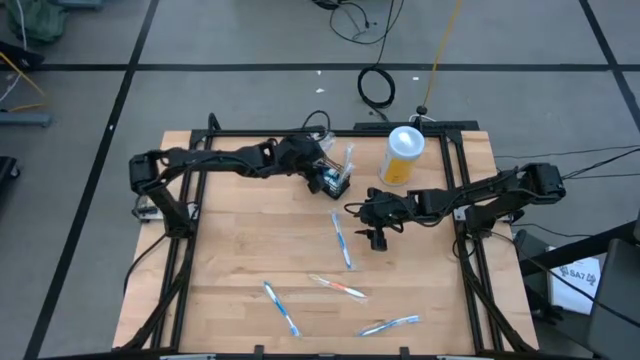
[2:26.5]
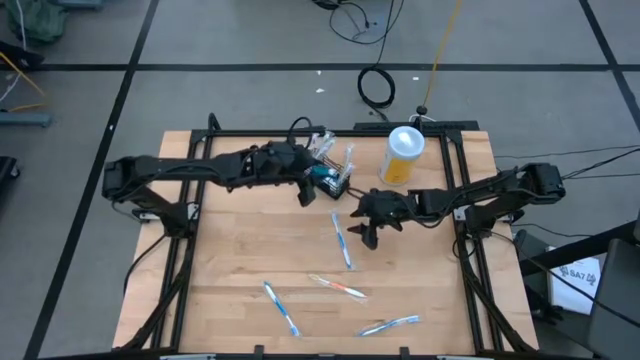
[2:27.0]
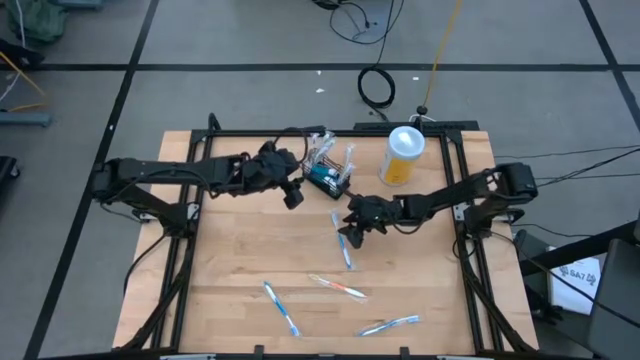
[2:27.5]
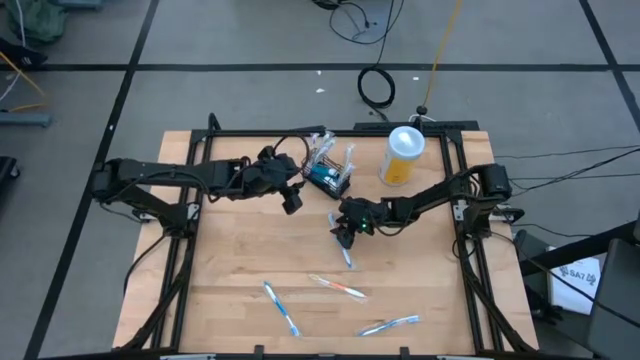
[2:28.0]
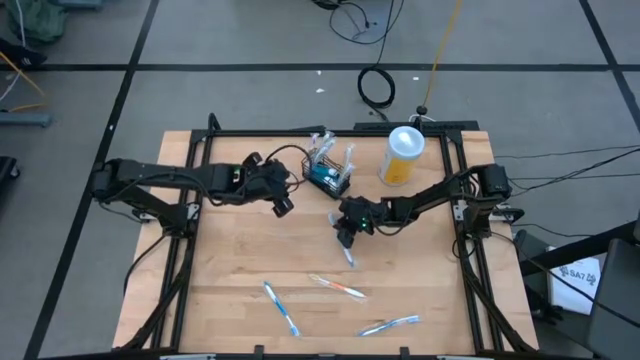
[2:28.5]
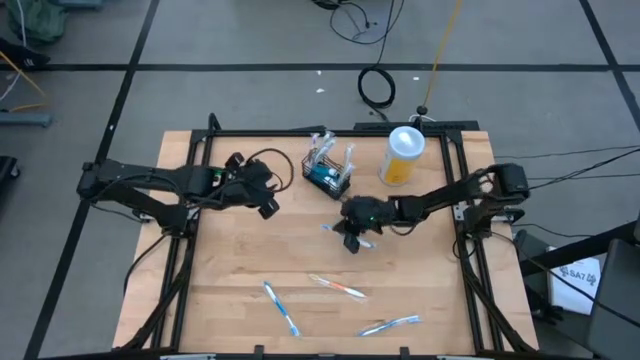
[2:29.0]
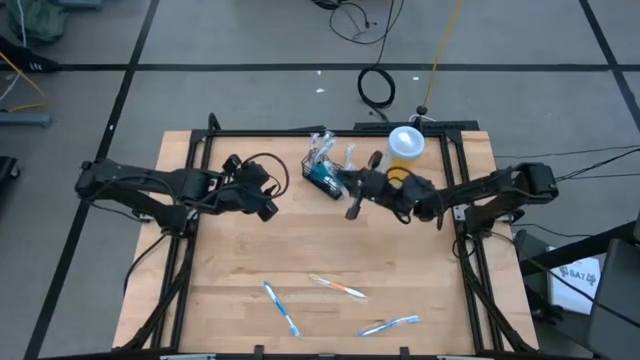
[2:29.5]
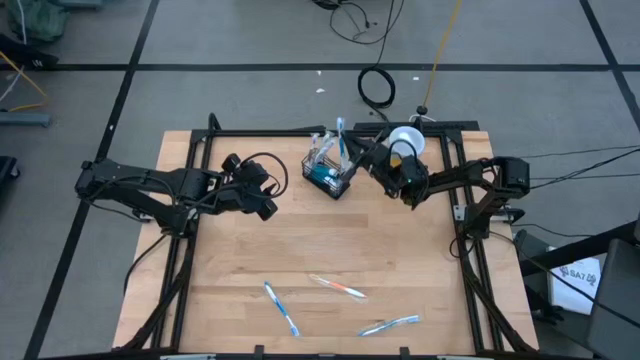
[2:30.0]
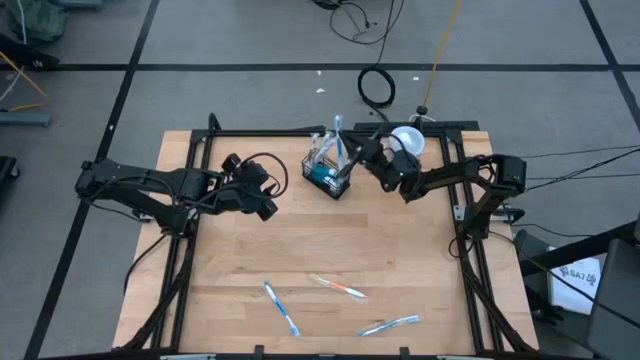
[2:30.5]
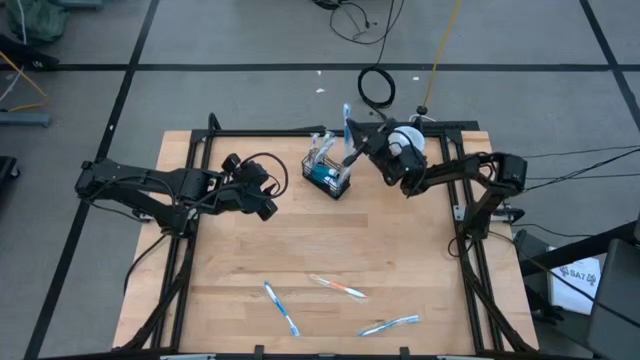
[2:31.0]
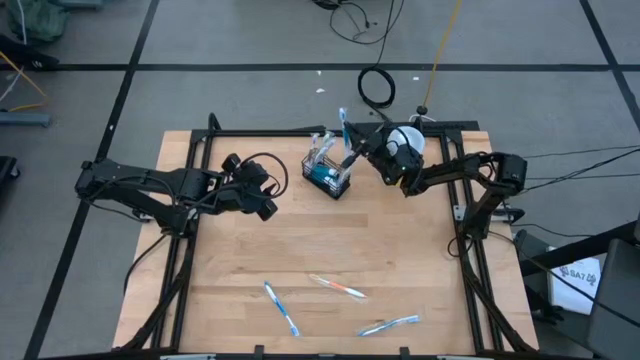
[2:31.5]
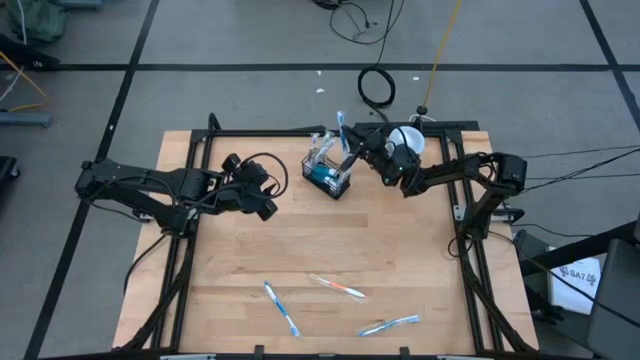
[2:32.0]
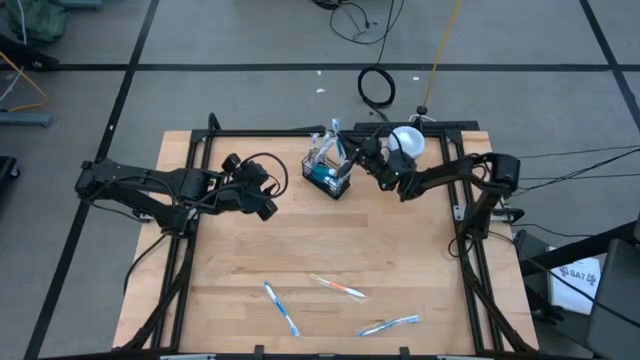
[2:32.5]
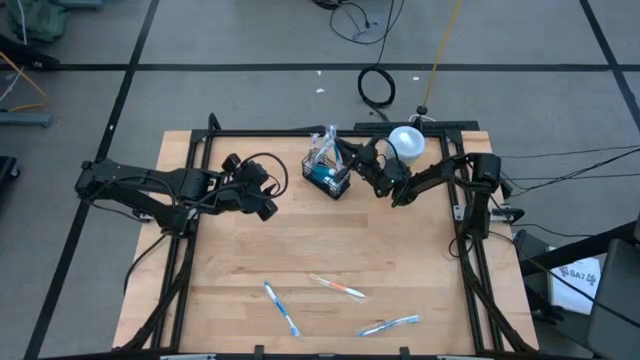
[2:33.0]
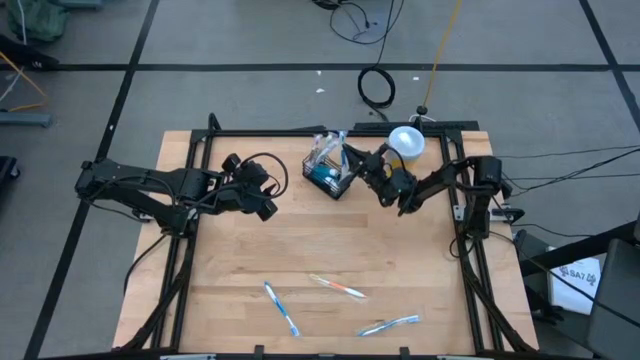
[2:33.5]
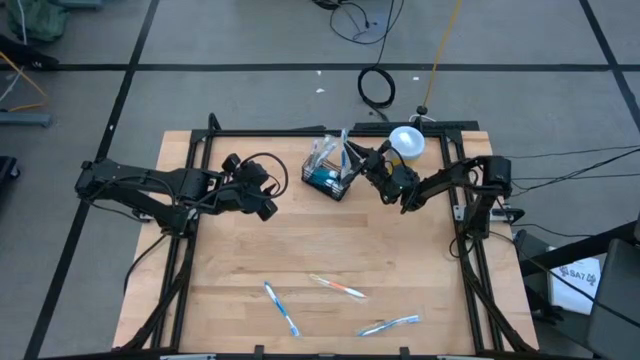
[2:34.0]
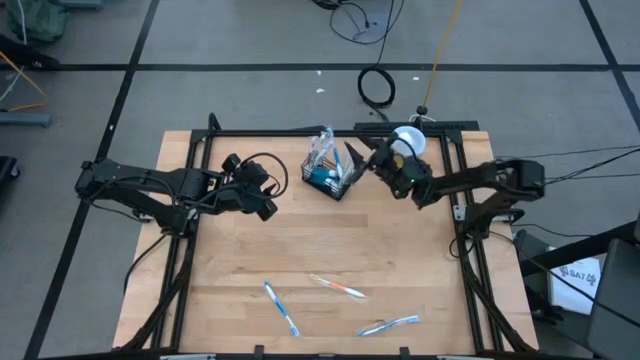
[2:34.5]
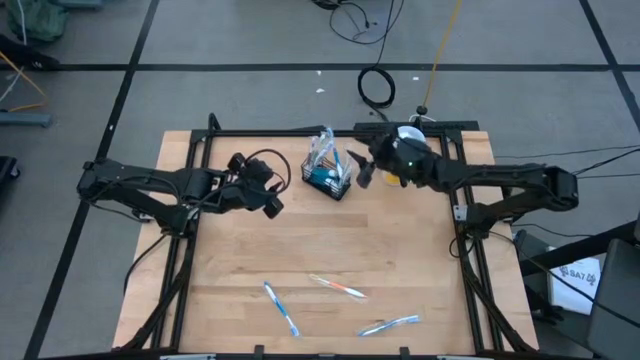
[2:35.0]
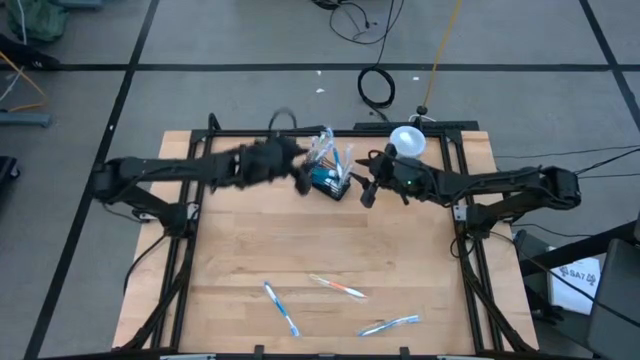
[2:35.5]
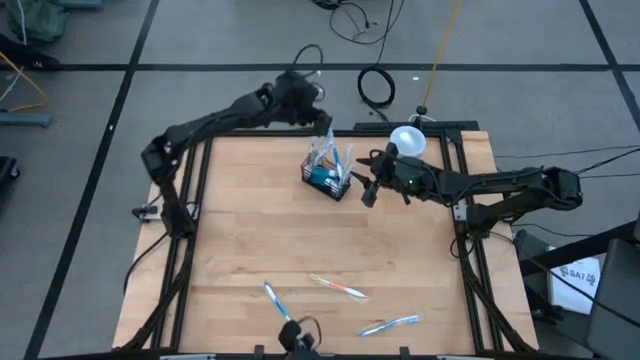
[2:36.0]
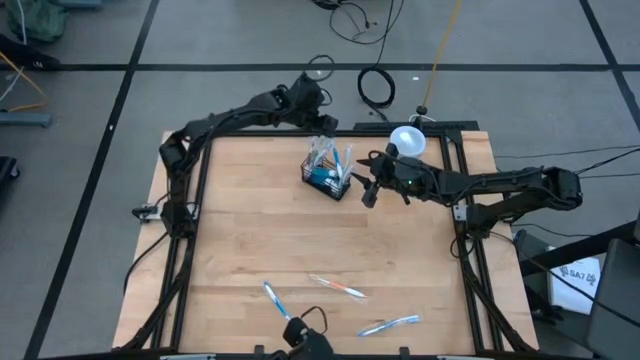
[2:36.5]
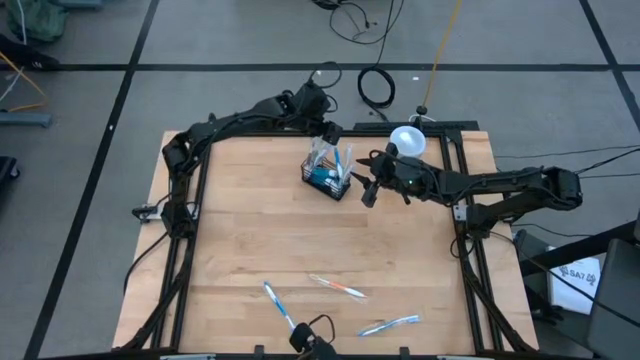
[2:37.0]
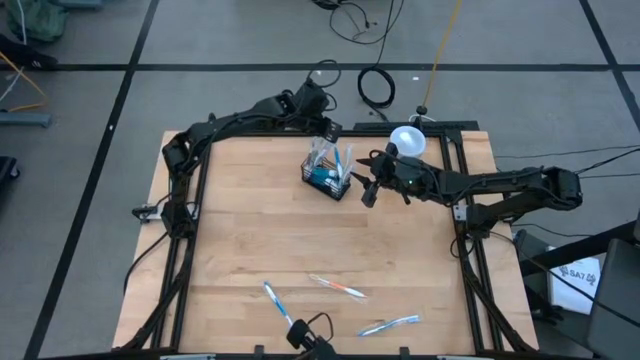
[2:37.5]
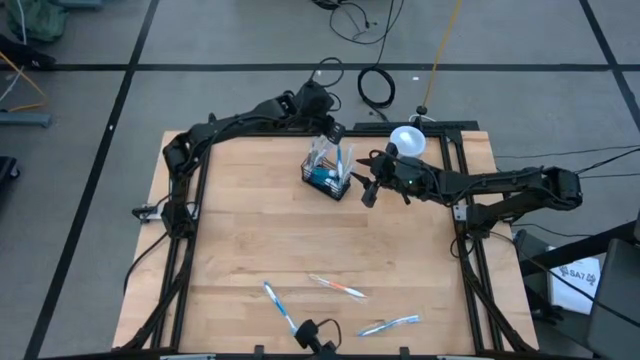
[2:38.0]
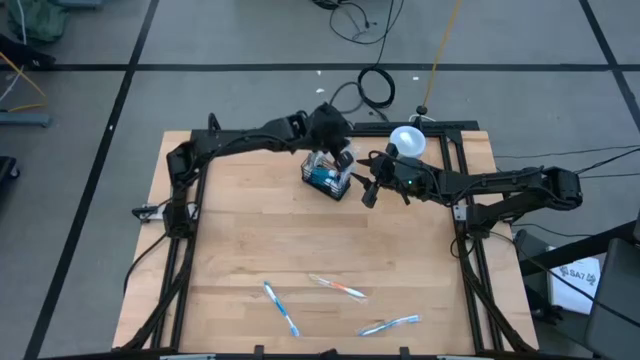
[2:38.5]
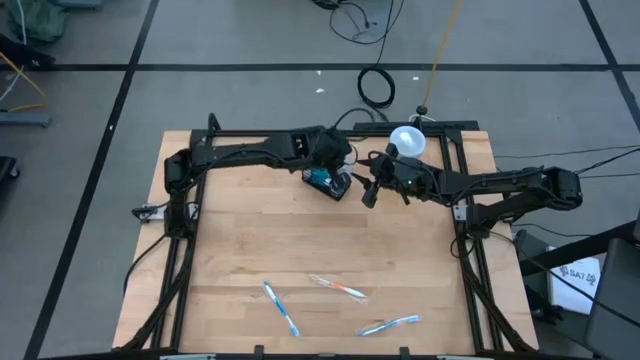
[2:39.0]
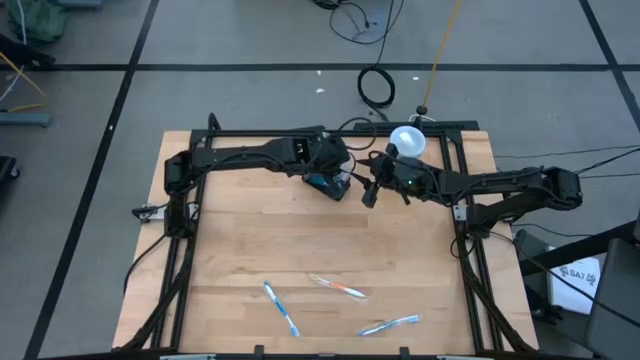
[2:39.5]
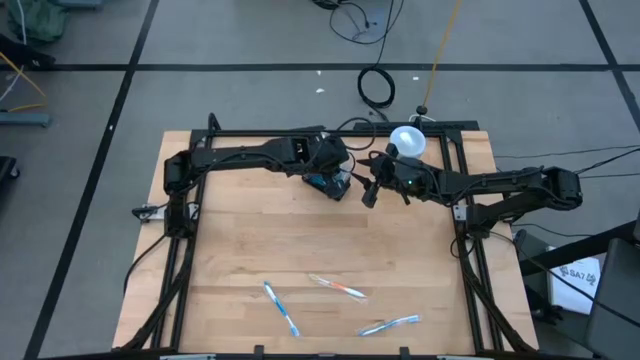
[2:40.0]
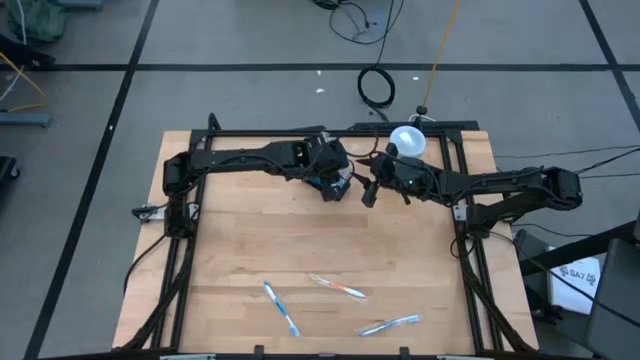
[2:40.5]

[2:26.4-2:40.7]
Task: Pick & Place toothbrushing station
Put the blue toothbrush into the black organizer

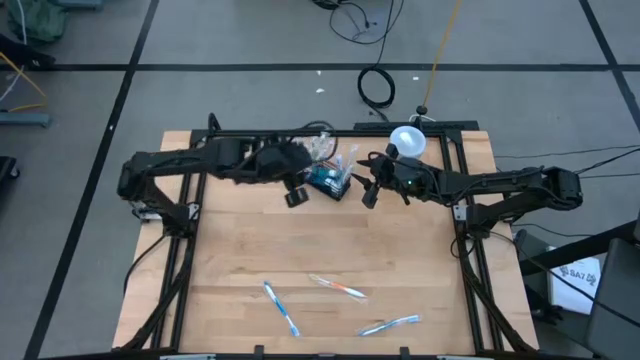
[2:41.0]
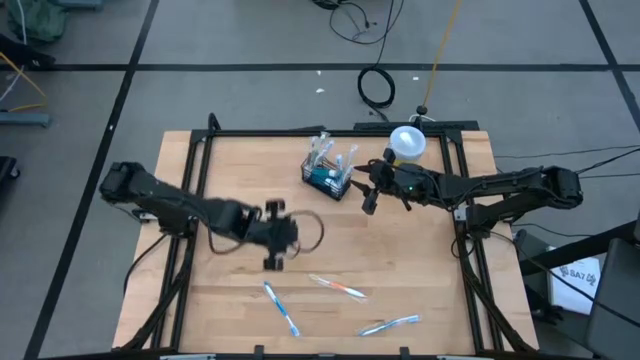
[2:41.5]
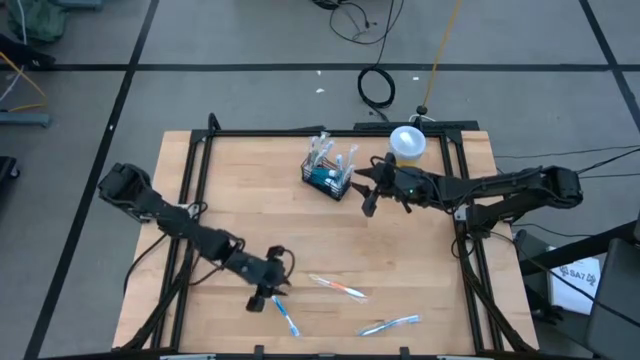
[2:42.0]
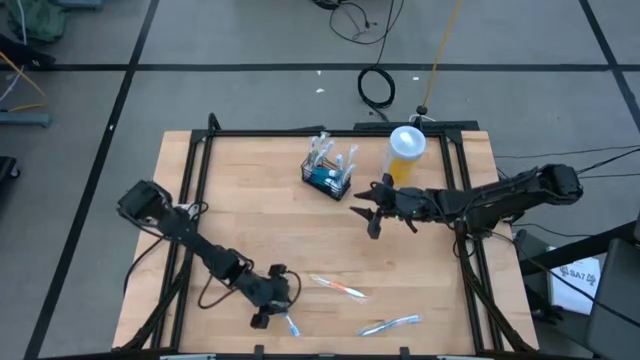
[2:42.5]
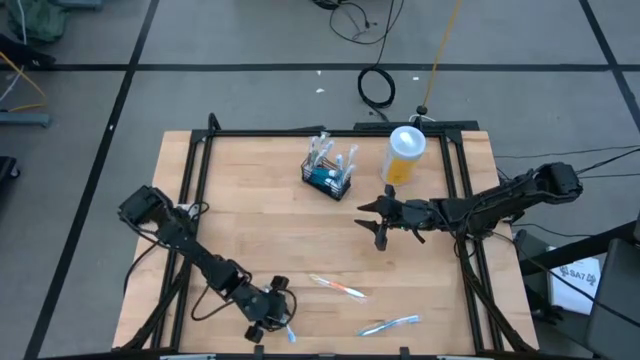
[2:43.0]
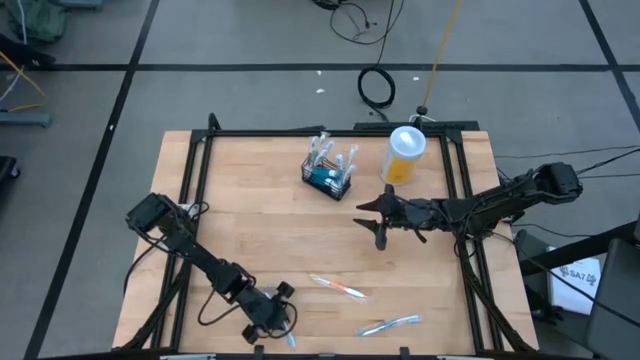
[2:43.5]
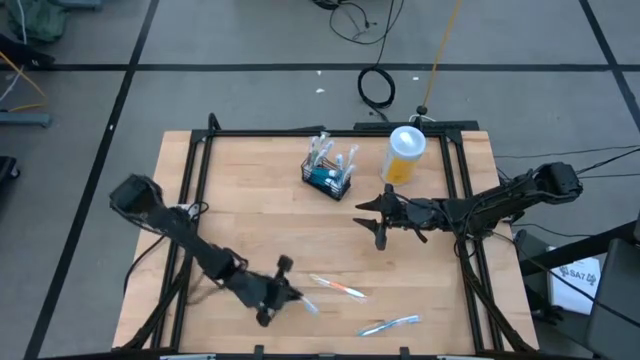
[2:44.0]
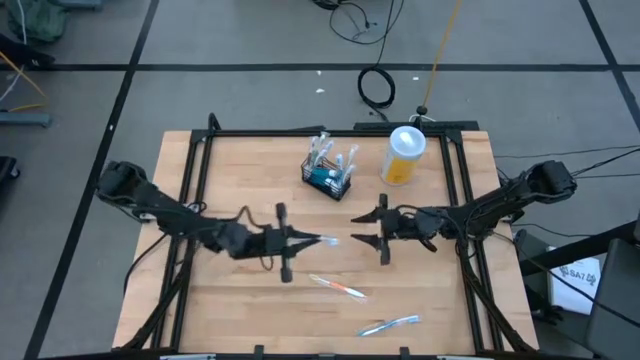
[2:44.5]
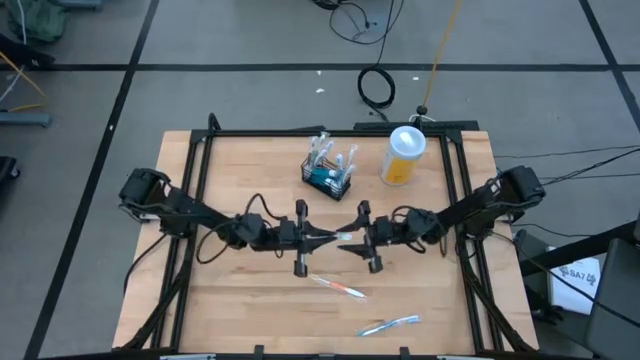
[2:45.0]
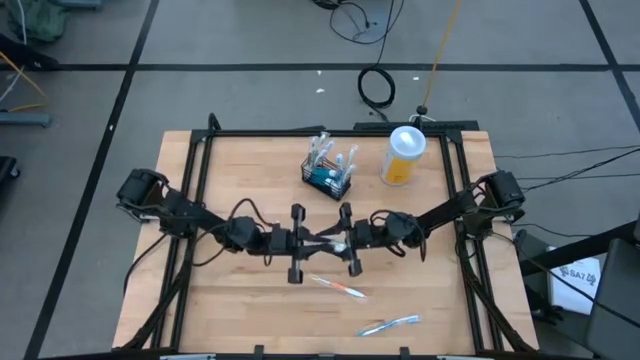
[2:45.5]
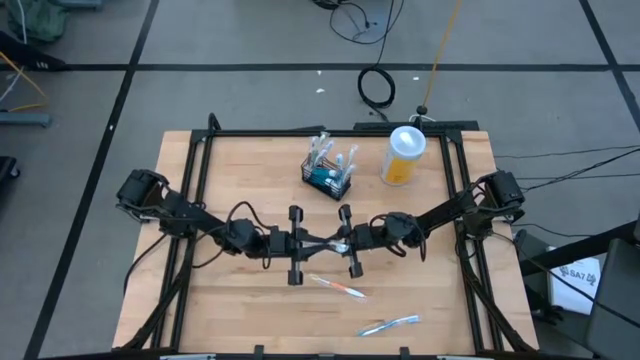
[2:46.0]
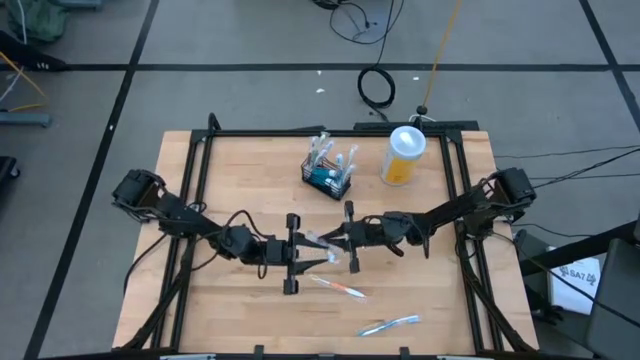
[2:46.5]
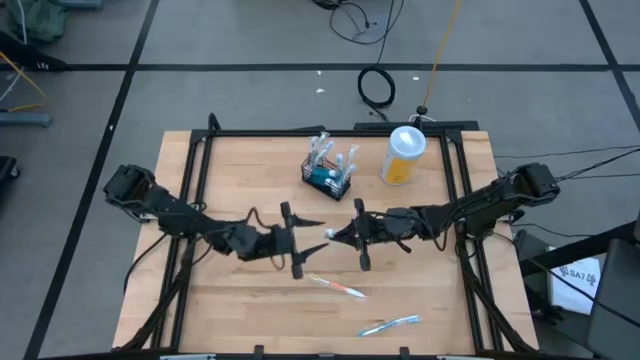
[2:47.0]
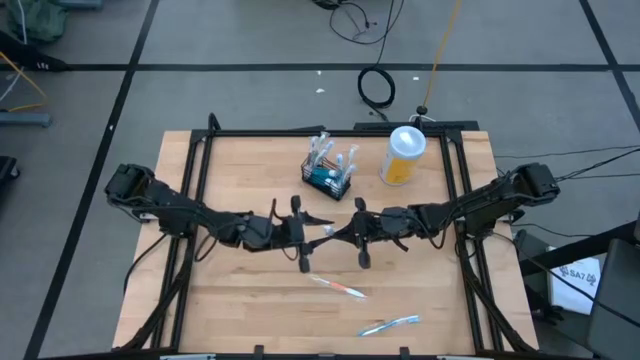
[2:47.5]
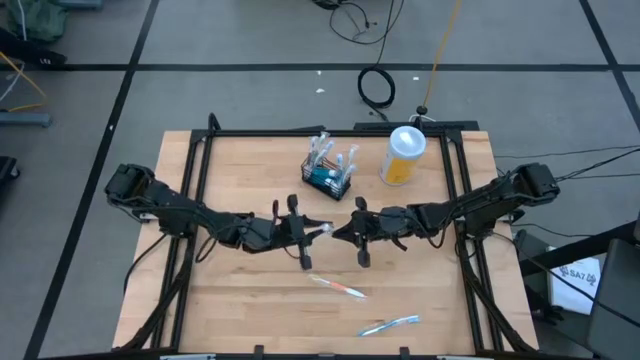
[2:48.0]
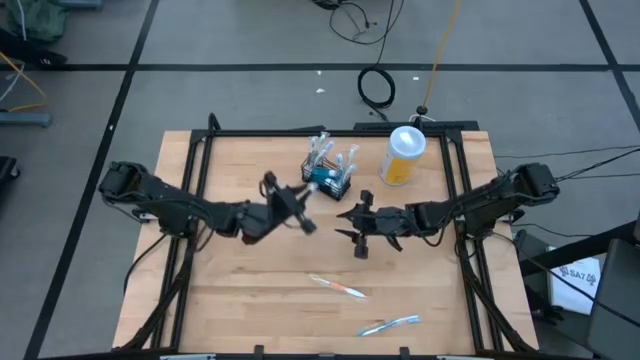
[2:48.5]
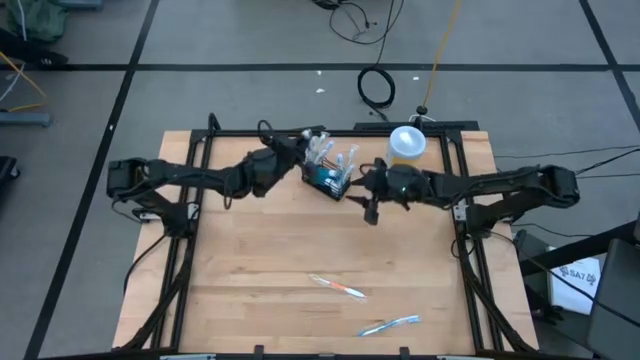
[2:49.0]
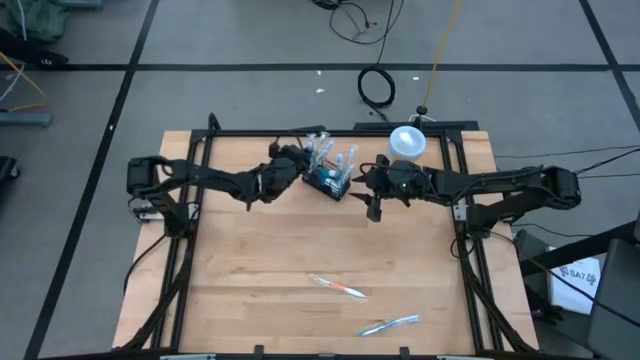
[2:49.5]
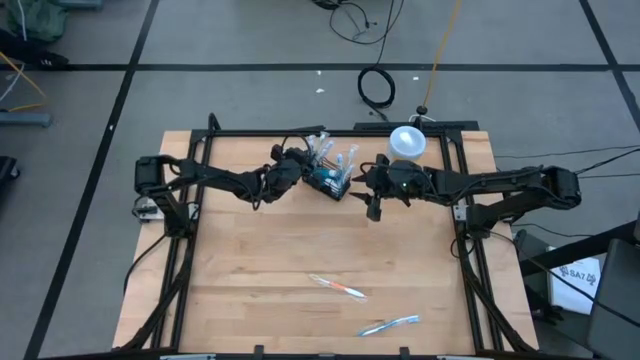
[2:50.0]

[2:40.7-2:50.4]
Put the blue toothbrush into the black organizer
